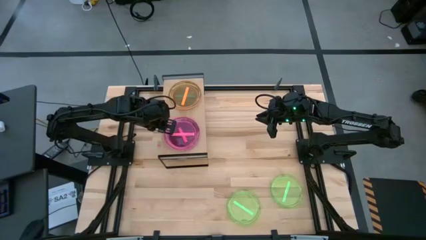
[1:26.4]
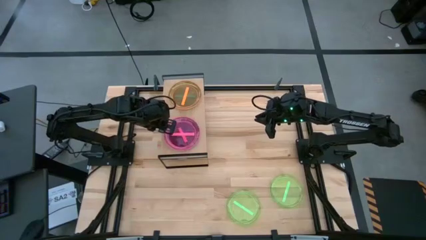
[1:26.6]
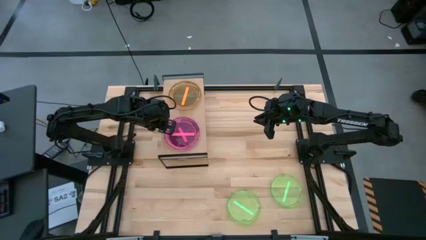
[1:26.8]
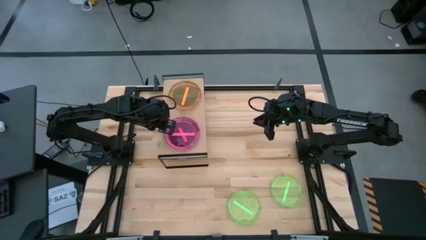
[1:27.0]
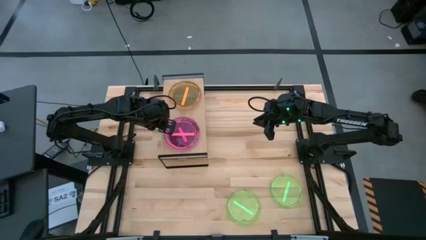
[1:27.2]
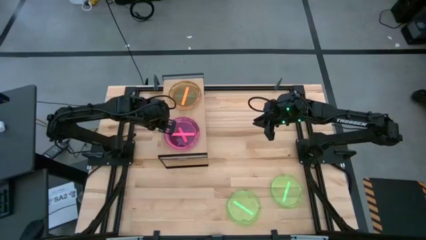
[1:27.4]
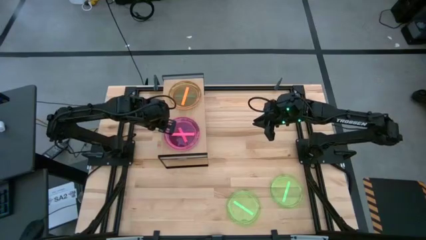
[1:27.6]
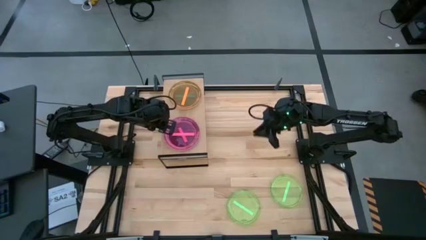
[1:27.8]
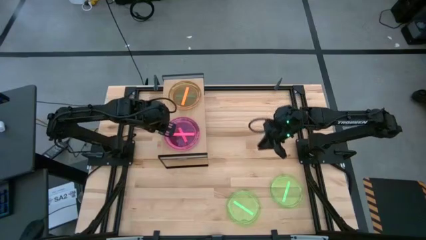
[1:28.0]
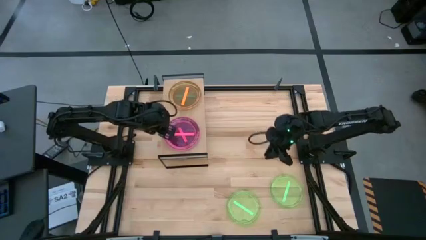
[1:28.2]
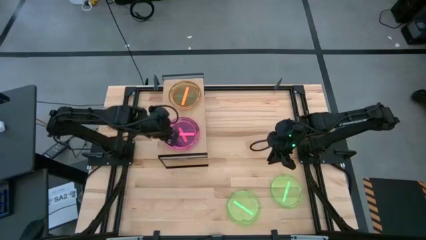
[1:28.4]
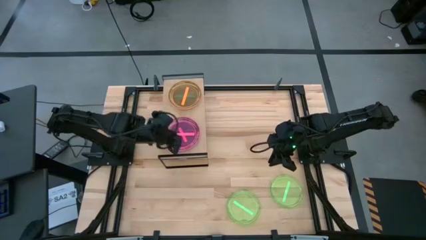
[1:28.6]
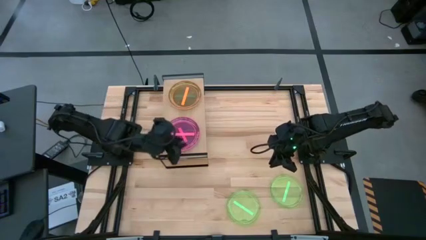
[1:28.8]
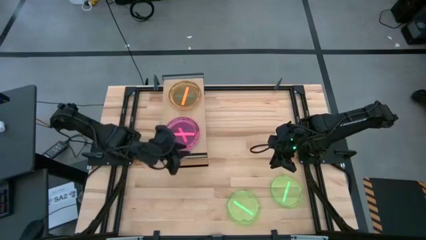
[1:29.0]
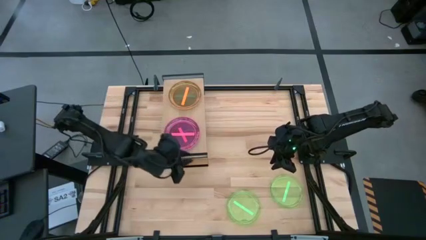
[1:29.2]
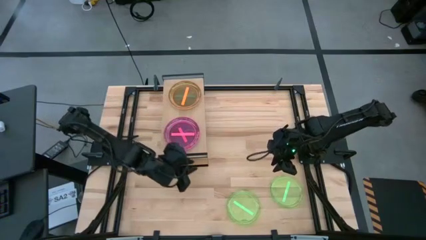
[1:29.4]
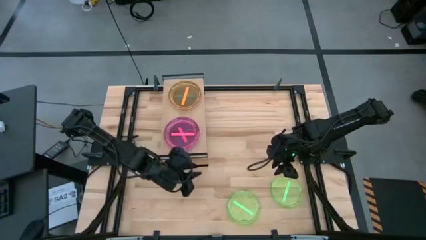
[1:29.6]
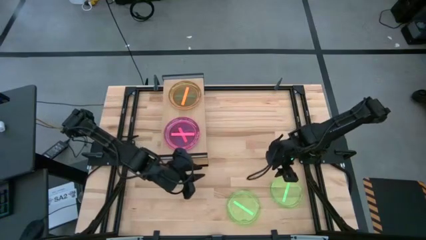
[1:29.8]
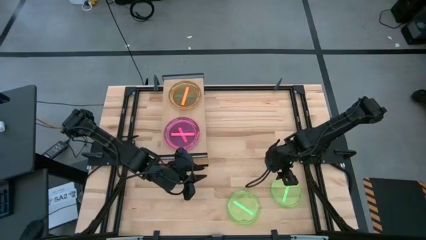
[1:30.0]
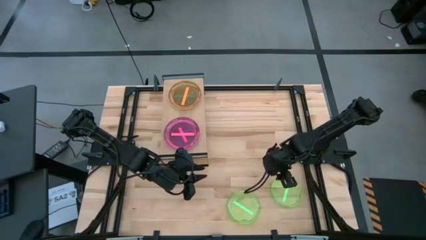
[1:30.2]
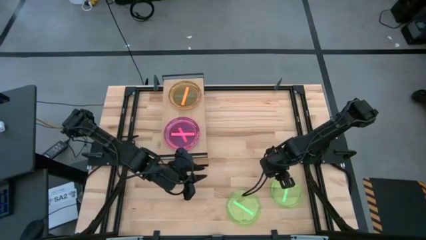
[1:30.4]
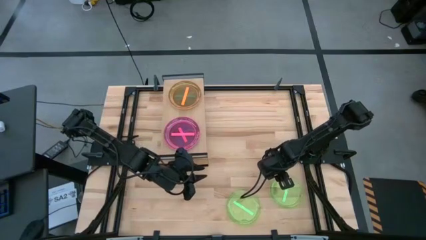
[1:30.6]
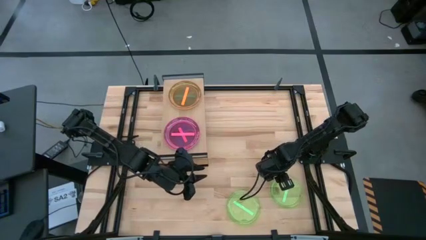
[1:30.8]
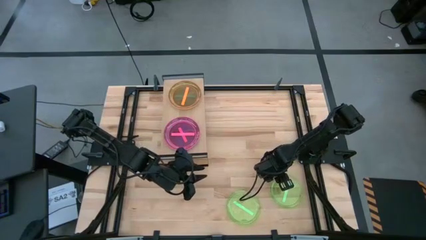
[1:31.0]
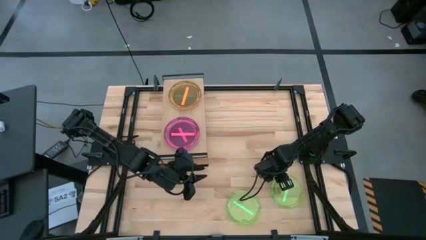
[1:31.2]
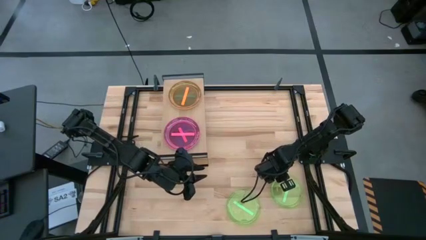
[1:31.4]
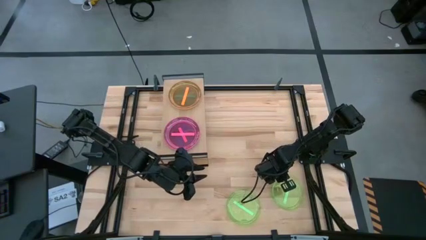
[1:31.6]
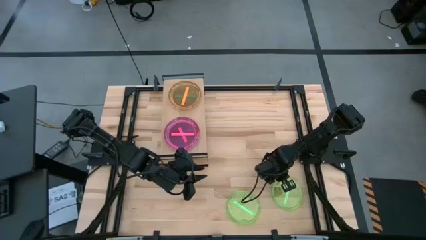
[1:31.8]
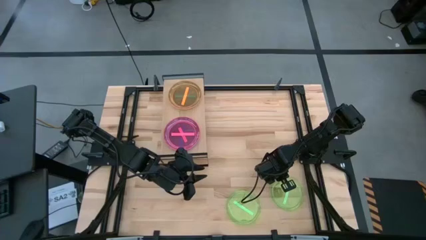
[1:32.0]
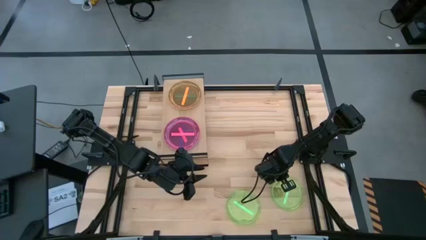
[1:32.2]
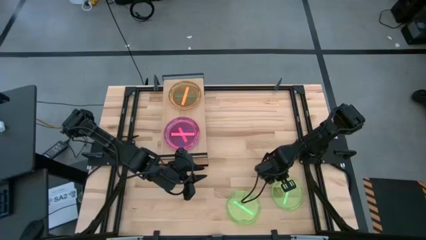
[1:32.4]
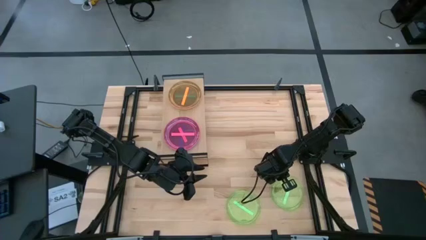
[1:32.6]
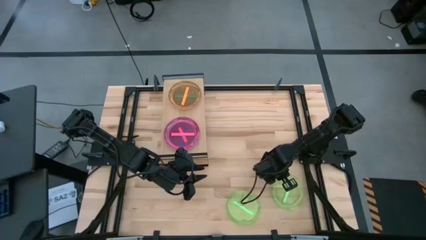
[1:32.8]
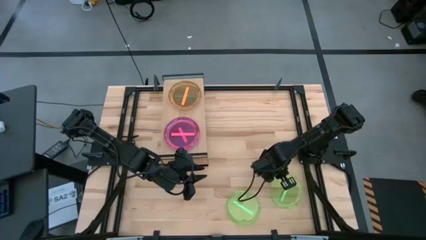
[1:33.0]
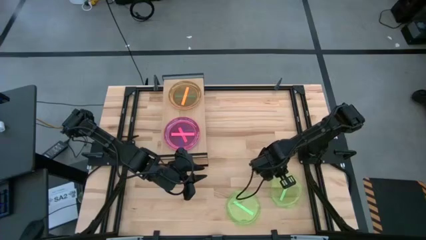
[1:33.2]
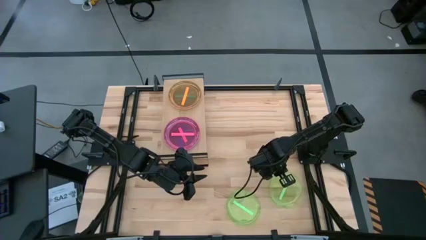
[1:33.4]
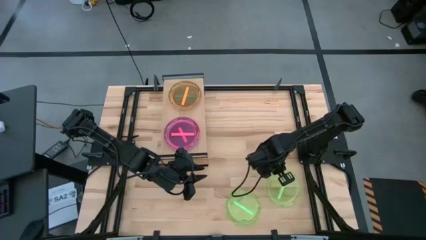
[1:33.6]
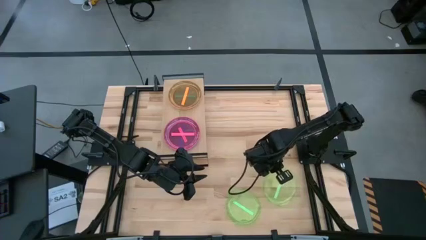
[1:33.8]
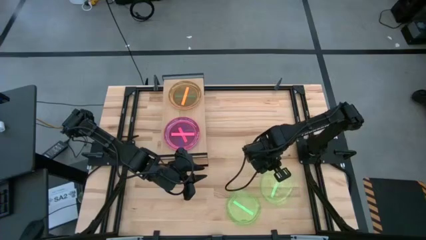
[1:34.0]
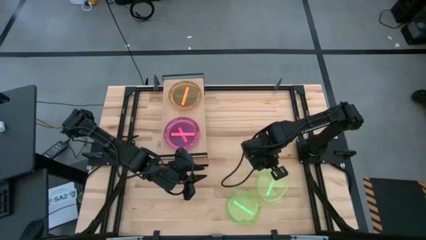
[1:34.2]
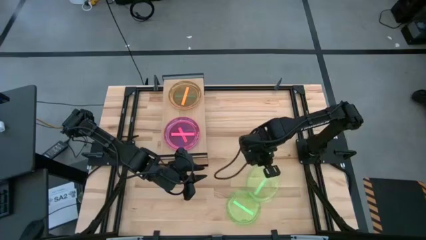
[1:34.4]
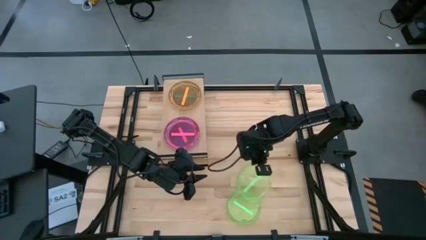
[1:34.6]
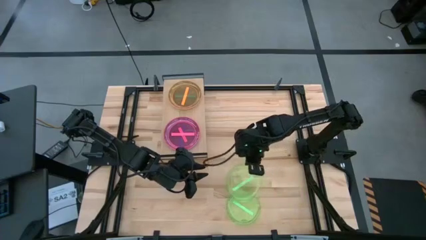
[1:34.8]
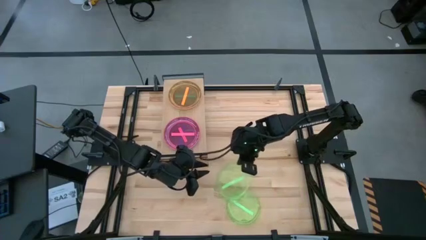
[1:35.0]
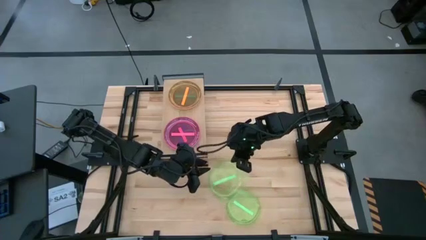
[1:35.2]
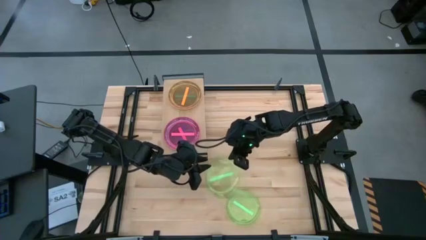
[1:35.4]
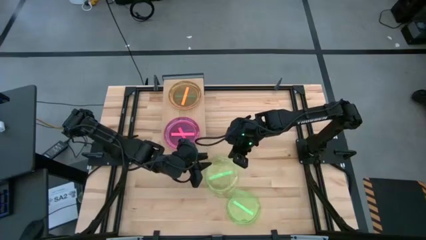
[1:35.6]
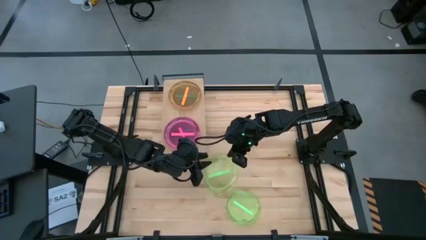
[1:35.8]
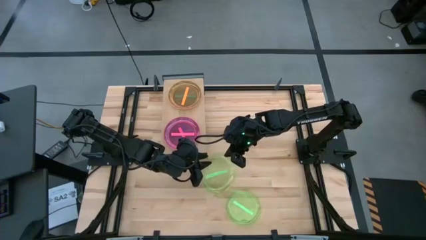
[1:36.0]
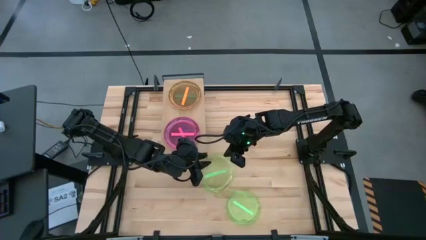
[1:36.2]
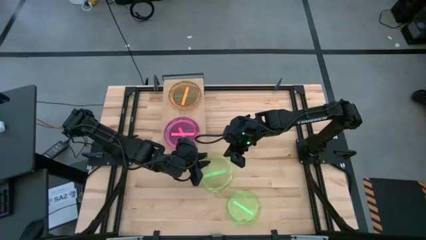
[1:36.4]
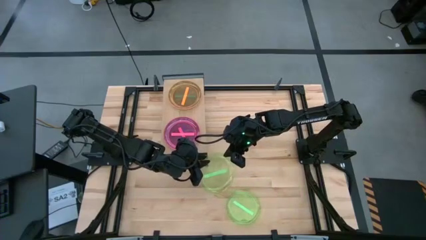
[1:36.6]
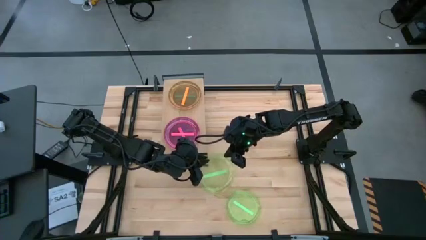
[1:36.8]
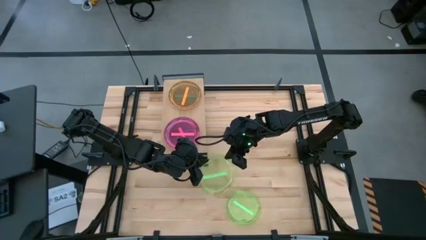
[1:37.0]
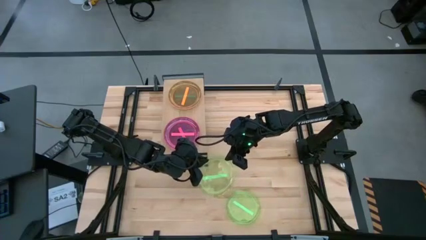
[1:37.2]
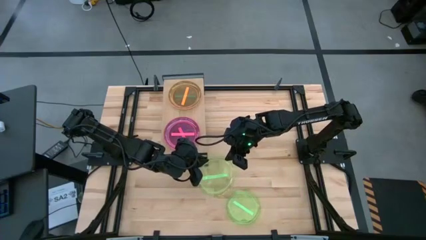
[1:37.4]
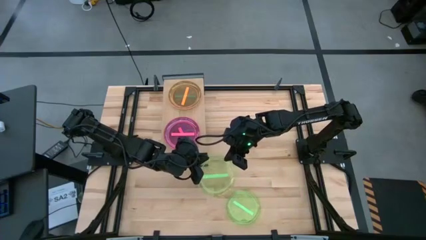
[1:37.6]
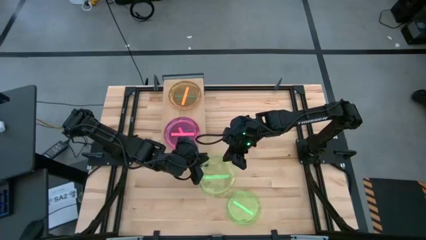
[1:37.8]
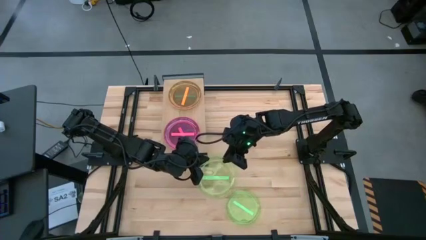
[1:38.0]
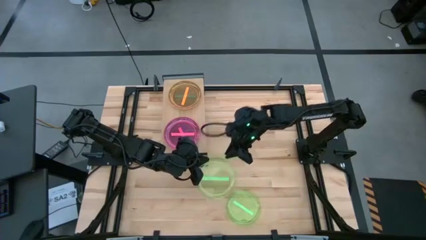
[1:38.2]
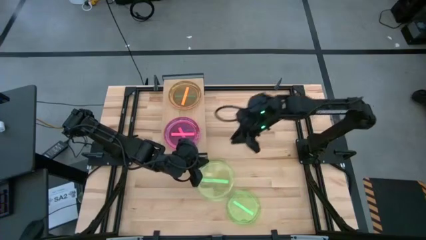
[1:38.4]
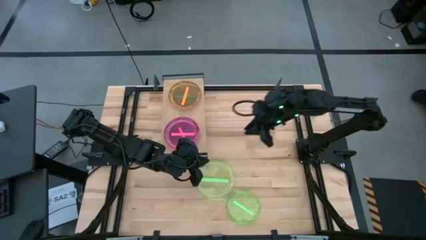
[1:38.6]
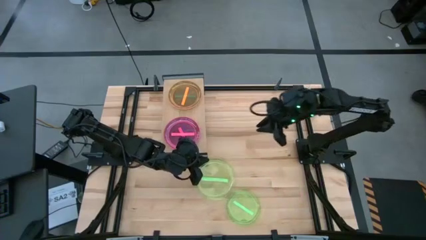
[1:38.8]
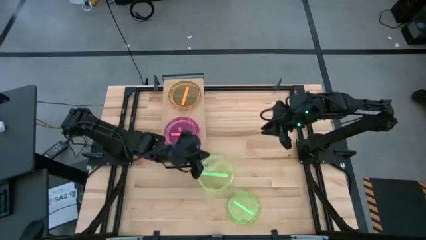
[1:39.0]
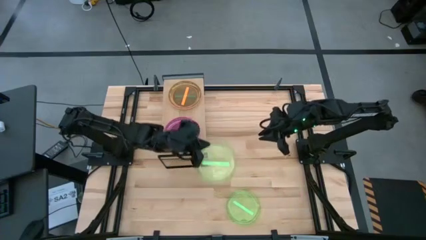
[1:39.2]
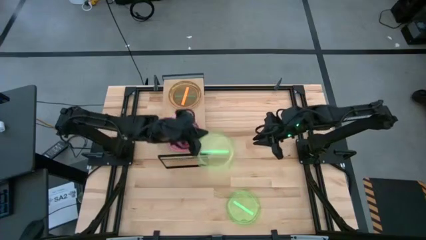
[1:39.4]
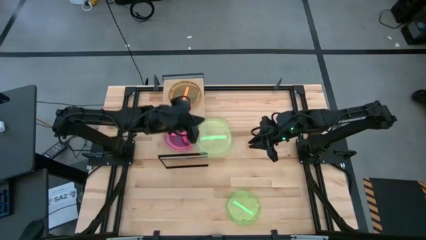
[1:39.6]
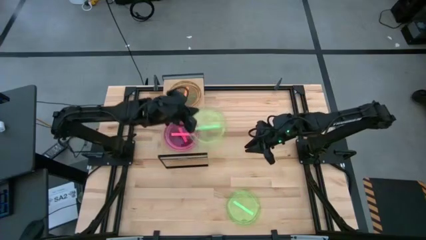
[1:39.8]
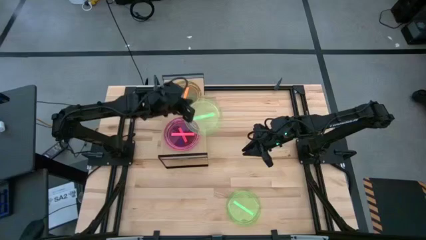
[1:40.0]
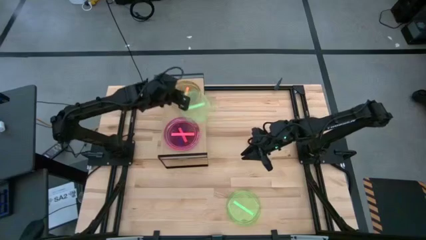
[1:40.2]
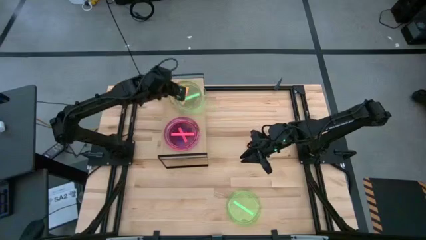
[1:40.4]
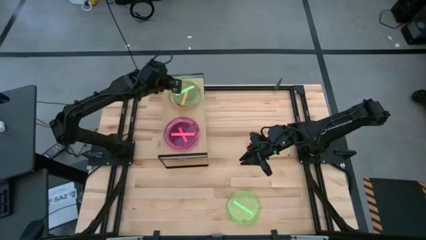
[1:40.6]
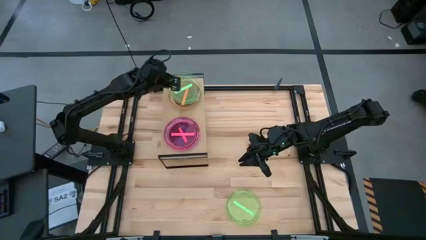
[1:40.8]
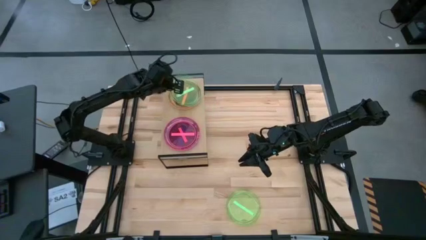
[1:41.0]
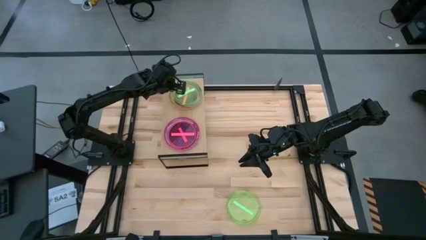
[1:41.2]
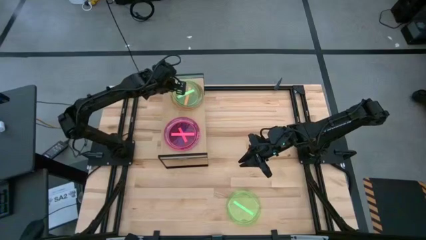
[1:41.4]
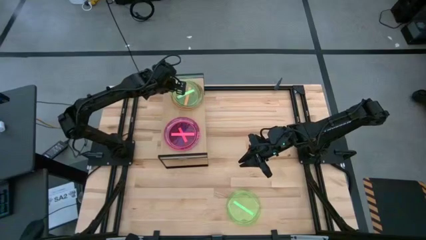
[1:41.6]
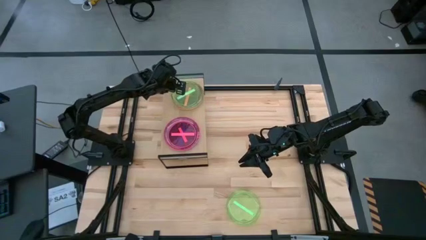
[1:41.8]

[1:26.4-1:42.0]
Task: Place and stack plates onto a shelf
Stack the right green plate on top of the orange plate on the shelf
